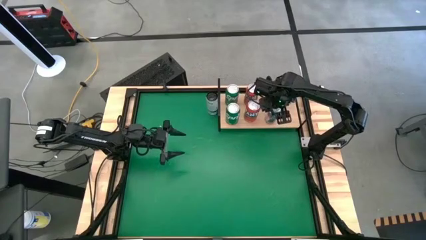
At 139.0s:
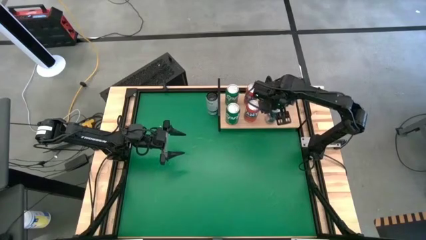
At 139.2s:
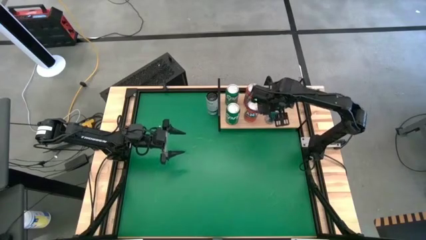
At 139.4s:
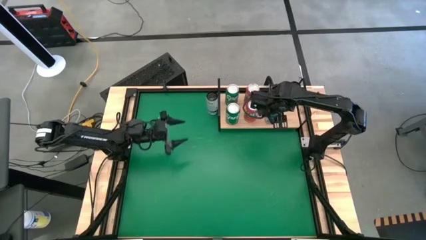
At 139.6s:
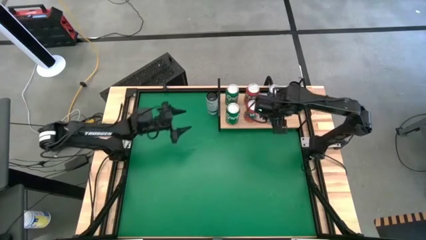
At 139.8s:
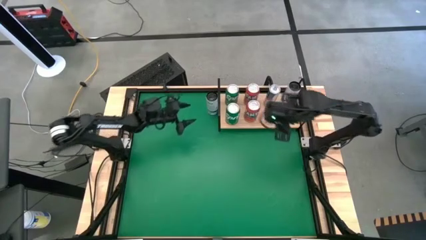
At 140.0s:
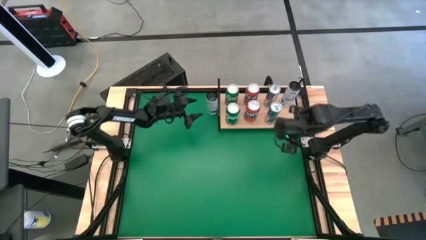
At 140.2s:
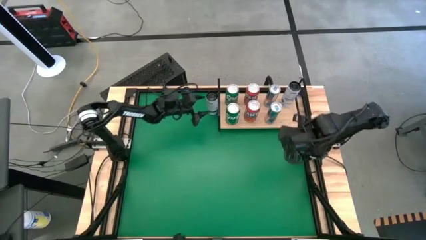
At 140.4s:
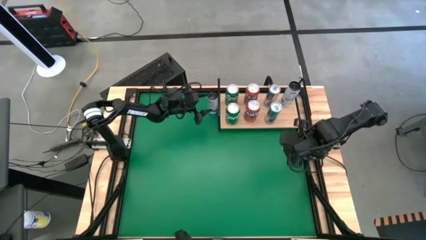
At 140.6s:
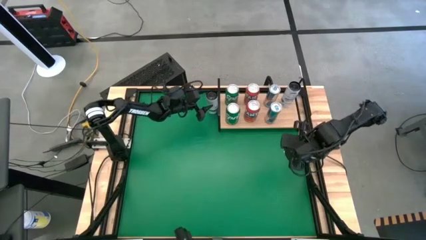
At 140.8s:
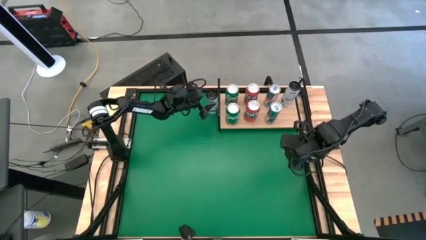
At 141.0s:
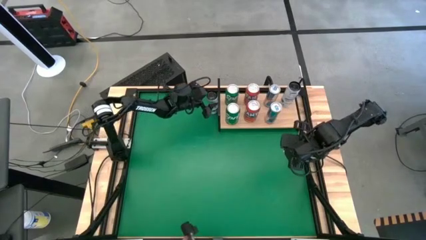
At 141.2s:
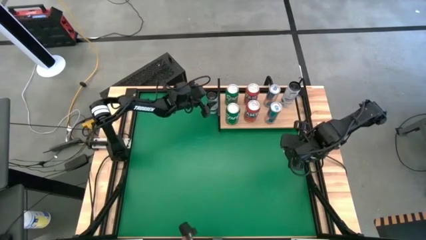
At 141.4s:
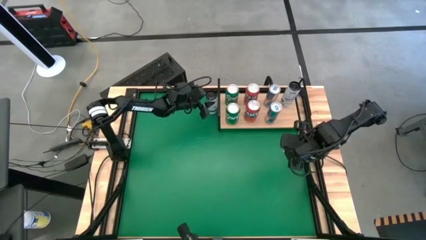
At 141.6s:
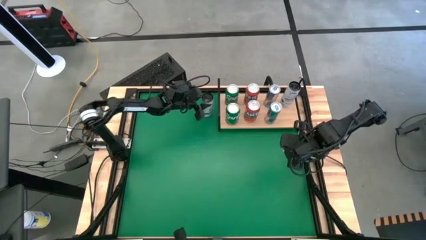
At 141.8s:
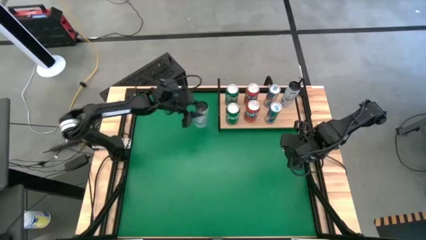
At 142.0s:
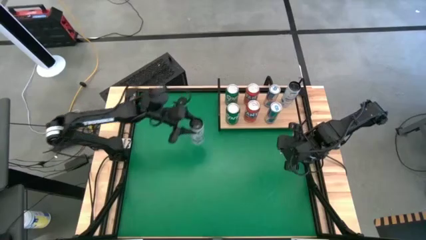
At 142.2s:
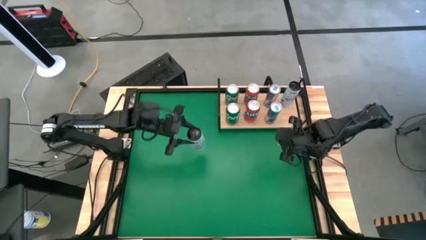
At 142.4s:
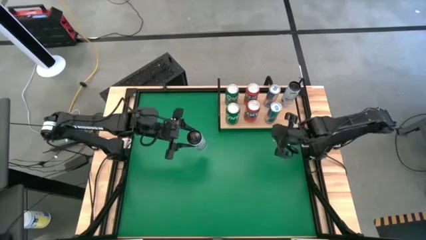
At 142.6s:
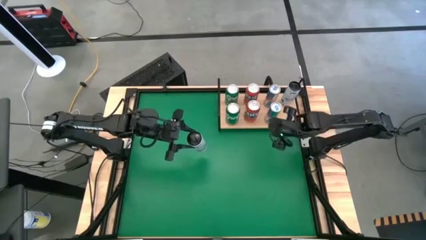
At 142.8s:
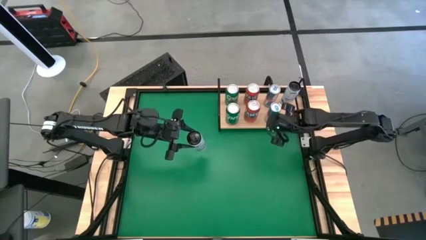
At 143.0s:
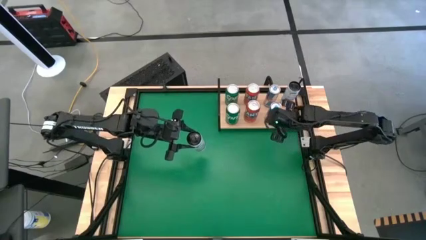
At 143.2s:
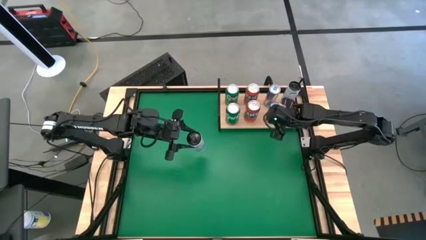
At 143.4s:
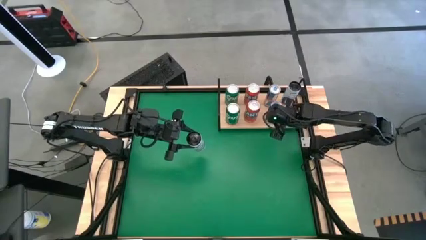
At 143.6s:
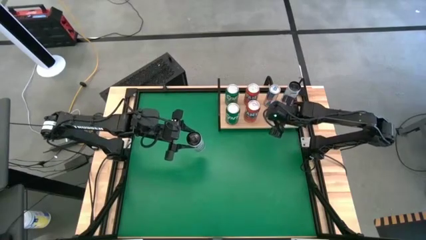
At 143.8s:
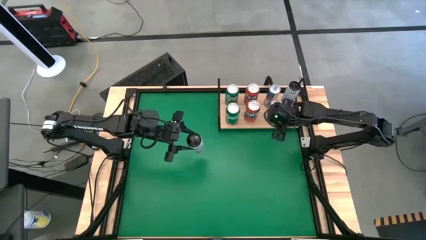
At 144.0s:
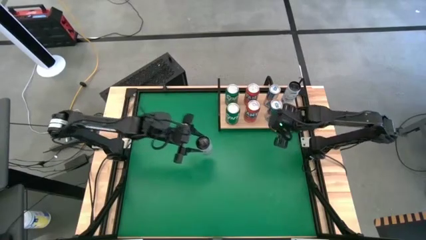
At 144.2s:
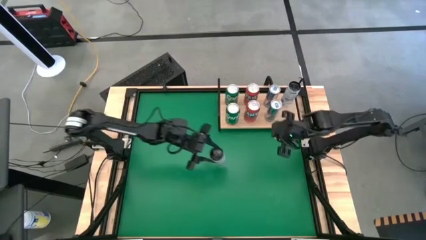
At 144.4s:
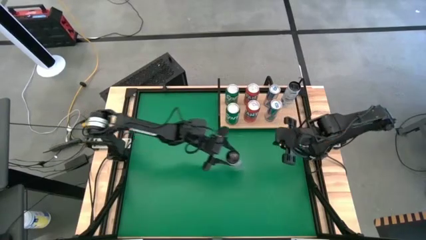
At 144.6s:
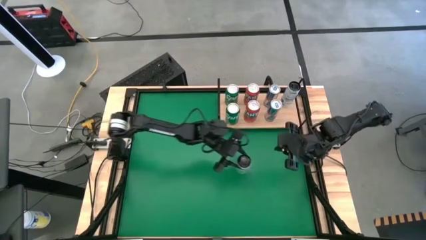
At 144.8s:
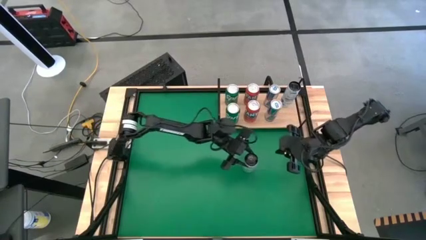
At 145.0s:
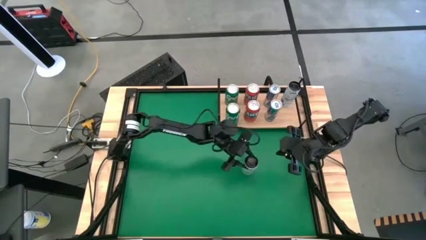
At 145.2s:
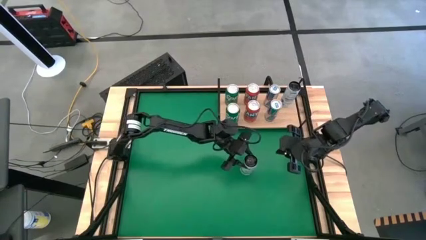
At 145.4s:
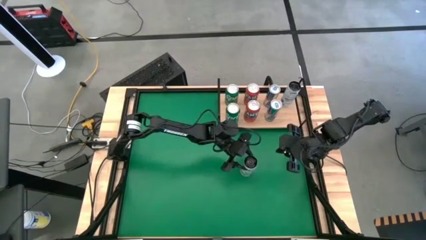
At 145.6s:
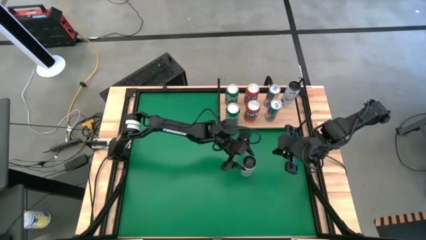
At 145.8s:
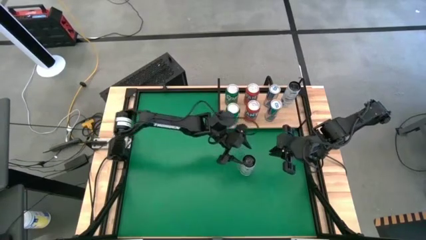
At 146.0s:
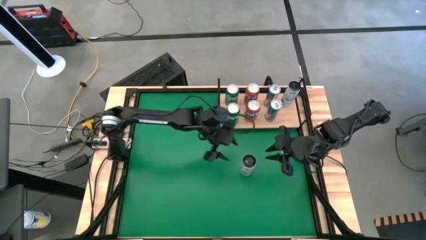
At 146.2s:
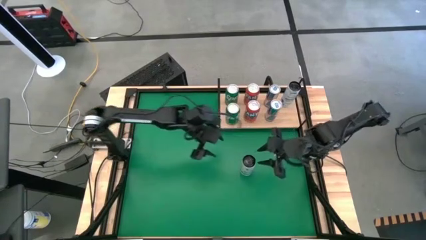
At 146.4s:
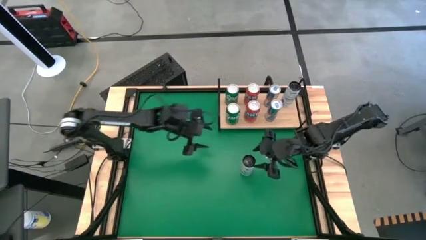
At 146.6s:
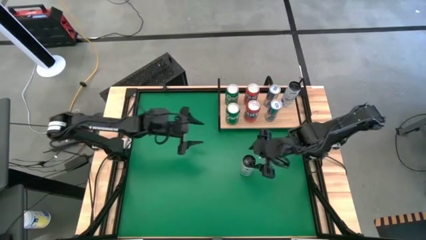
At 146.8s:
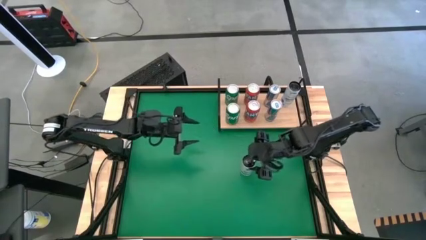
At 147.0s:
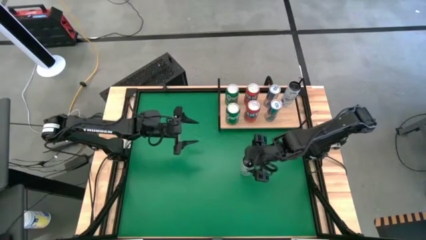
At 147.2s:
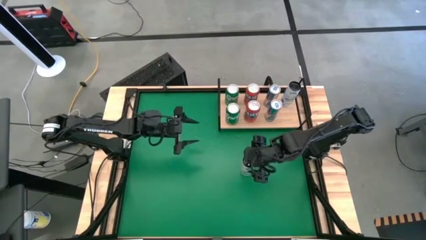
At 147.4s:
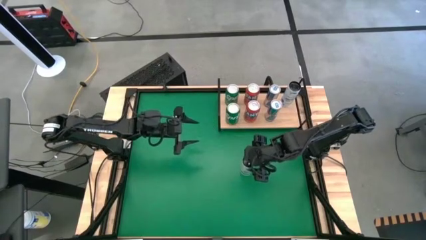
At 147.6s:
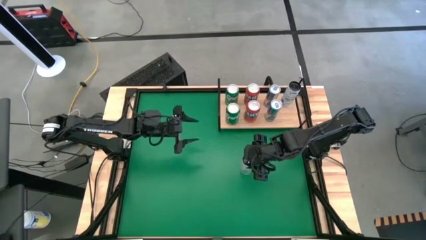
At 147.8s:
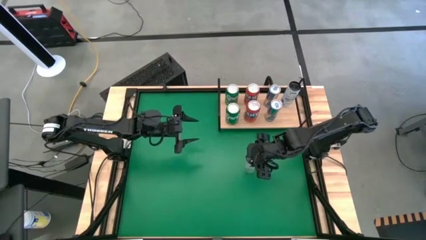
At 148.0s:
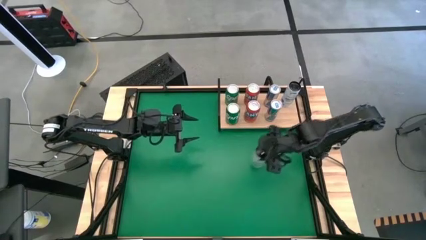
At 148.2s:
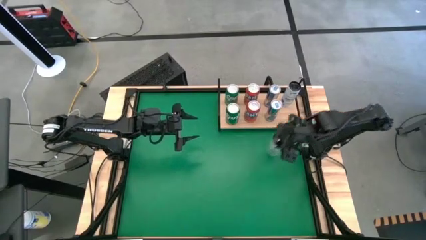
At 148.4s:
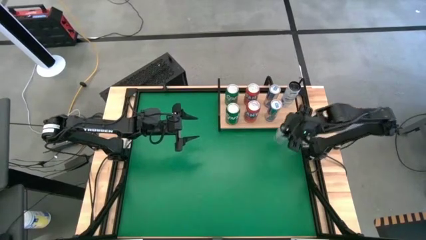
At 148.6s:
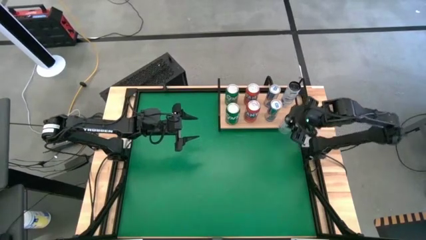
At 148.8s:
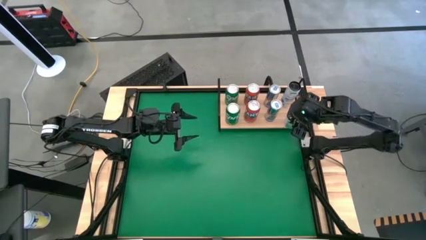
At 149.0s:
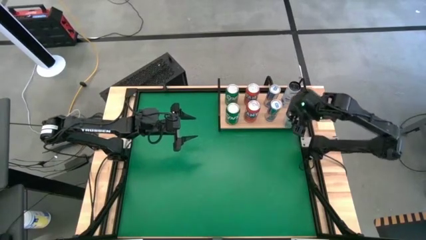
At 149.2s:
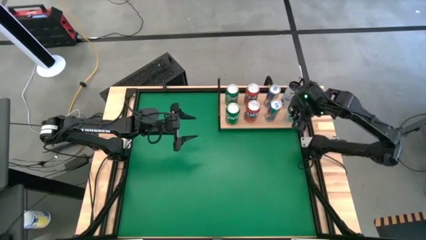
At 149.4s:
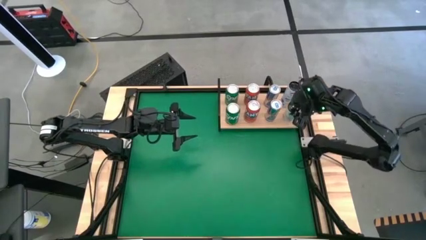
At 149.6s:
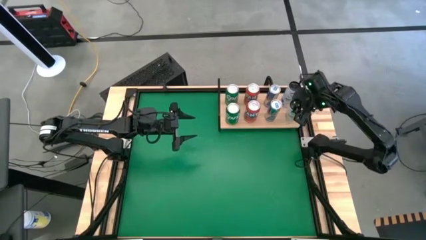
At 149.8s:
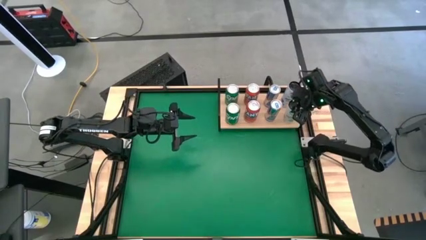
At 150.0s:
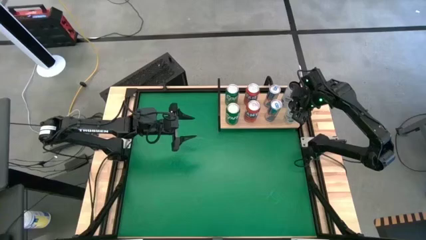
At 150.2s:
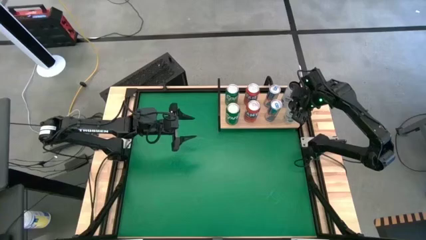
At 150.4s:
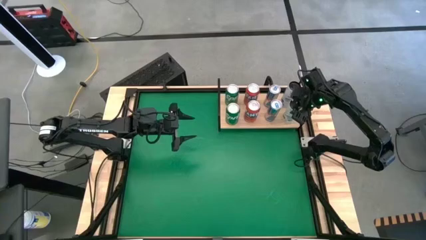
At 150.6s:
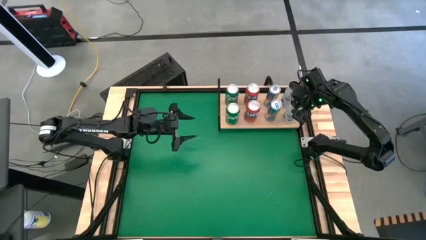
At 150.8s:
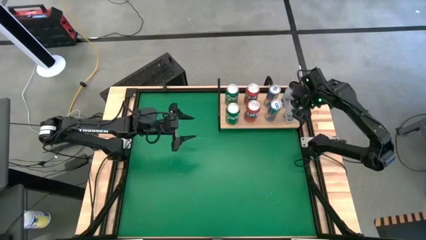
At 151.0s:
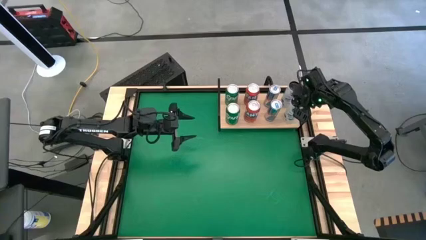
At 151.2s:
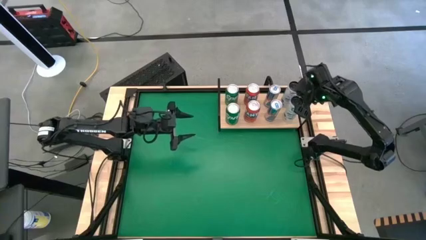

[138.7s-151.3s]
Task: Place canned beverage on shelf
Put the white and blue soda can on the shelf aligned with the other white and blue soda can

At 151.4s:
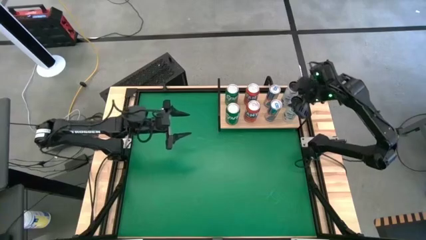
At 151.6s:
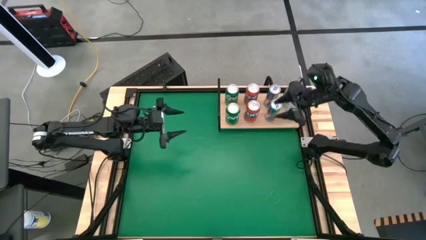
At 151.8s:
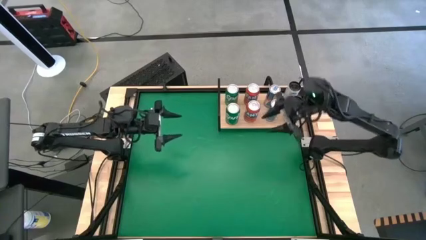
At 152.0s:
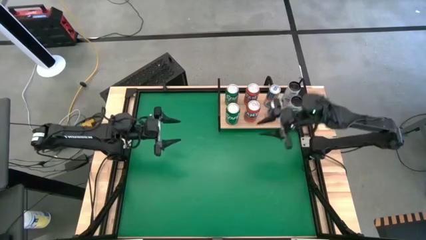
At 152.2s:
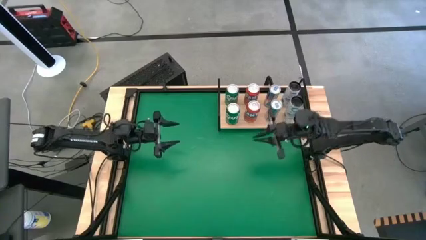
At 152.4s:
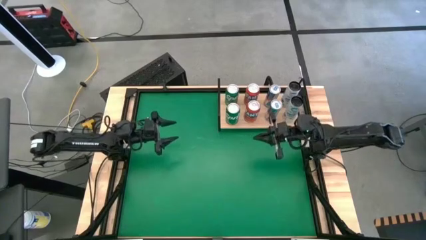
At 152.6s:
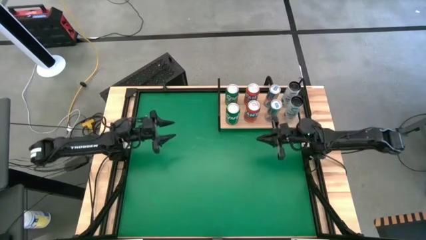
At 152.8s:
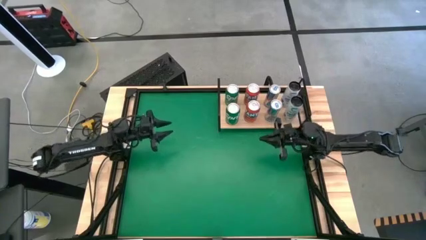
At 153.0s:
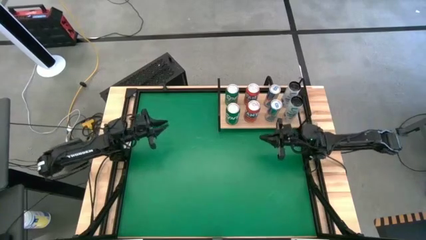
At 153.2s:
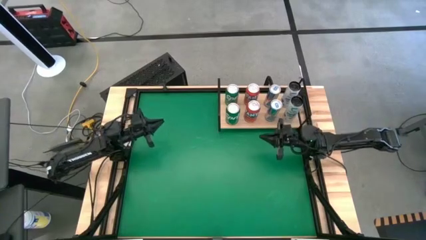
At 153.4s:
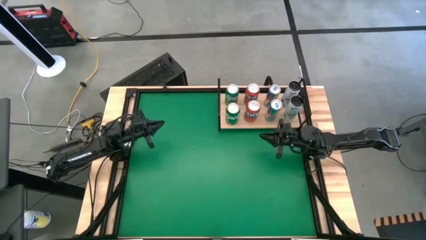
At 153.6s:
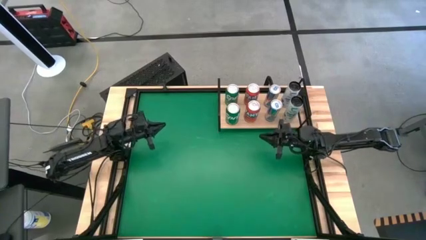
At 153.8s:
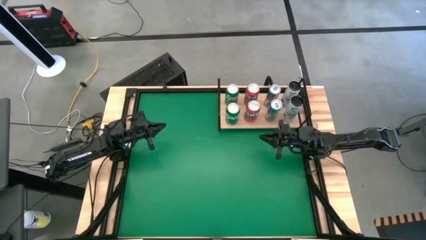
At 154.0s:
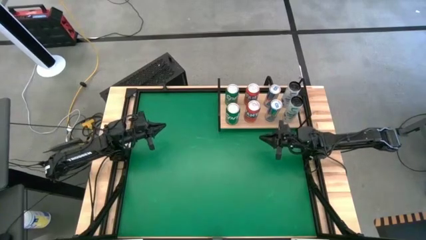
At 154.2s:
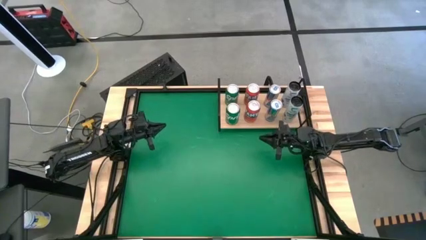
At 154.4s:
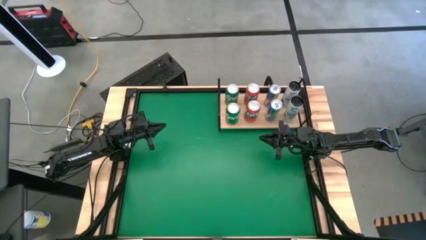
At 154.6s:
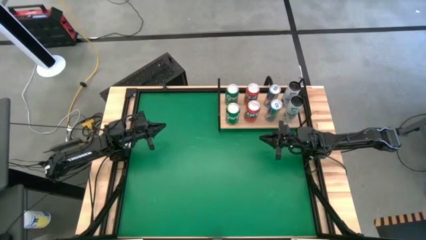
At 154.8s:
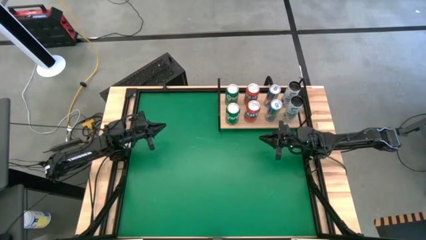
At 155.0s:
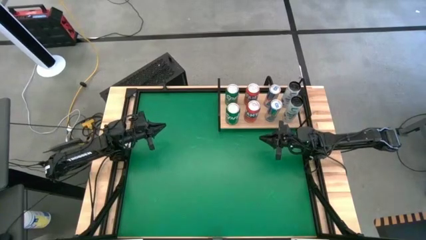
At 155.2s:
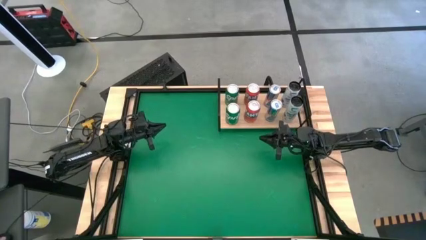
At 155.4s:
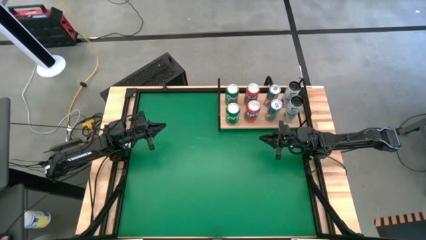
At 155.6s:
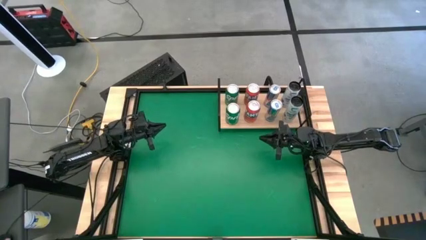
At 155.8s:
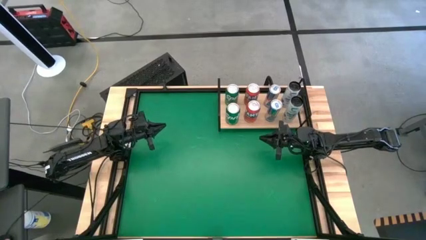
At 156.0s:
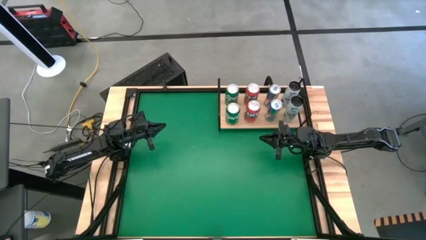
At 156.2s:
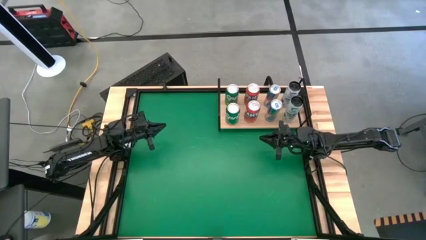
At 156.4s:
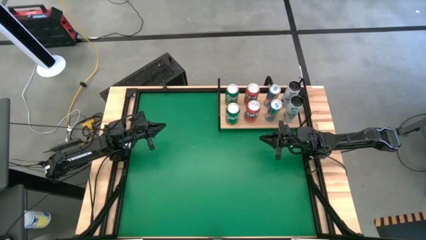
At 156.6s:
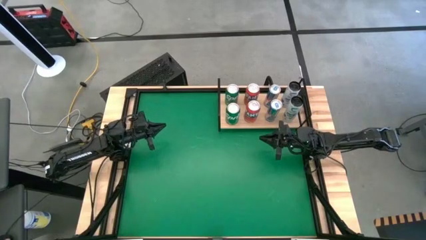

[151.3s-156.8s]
Return to Home Position
